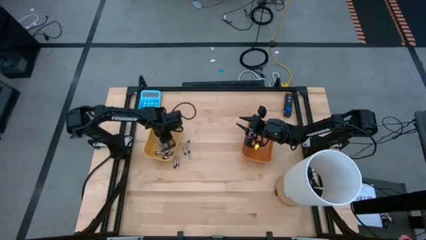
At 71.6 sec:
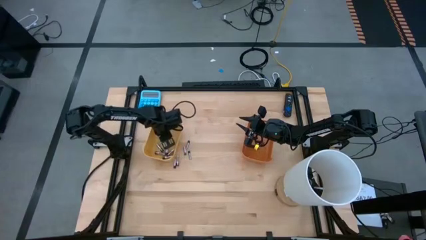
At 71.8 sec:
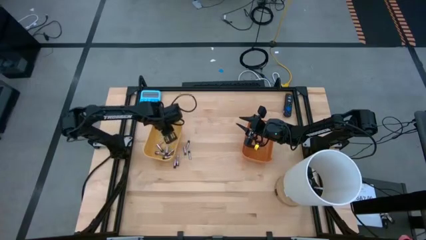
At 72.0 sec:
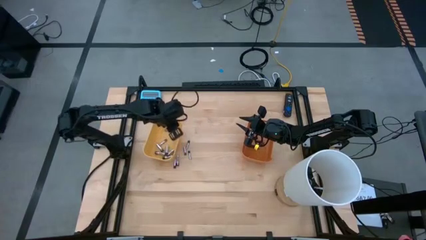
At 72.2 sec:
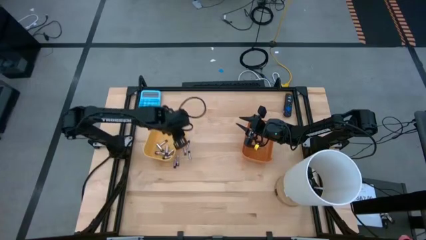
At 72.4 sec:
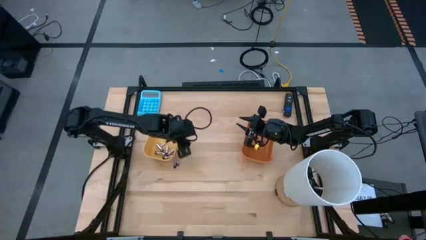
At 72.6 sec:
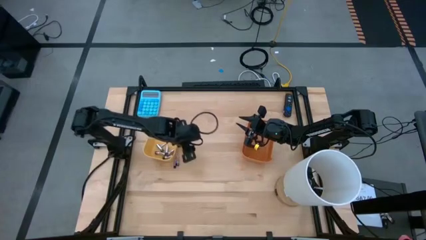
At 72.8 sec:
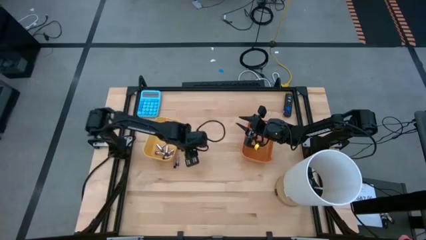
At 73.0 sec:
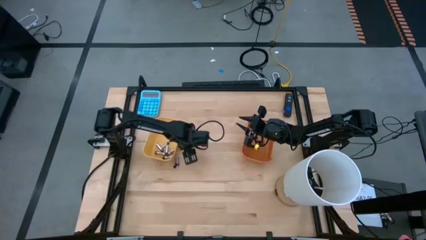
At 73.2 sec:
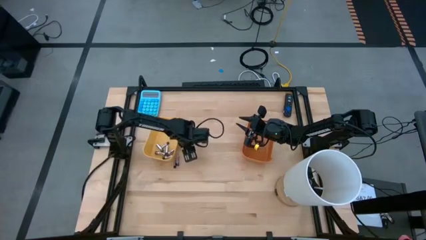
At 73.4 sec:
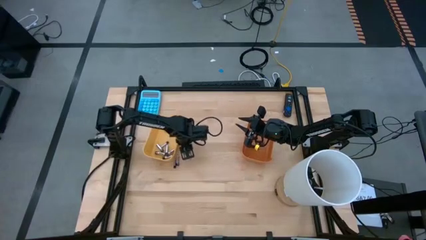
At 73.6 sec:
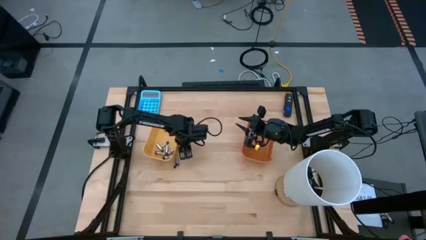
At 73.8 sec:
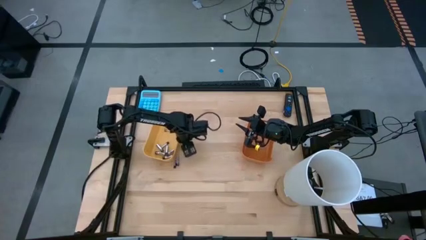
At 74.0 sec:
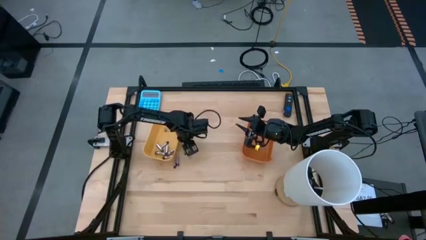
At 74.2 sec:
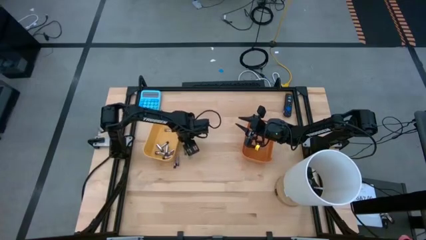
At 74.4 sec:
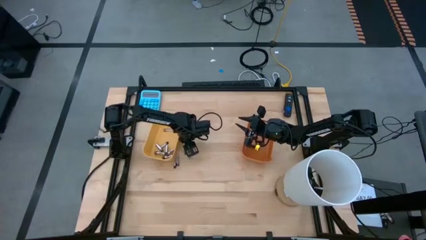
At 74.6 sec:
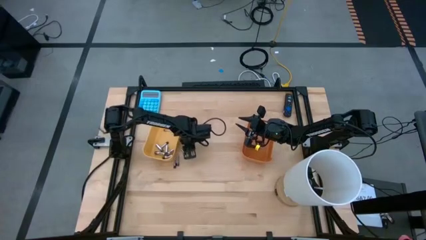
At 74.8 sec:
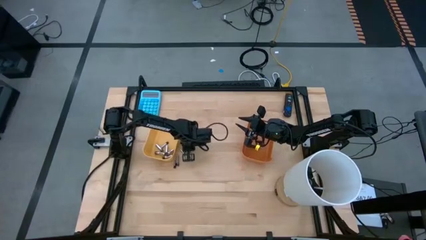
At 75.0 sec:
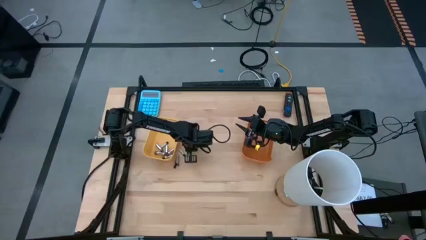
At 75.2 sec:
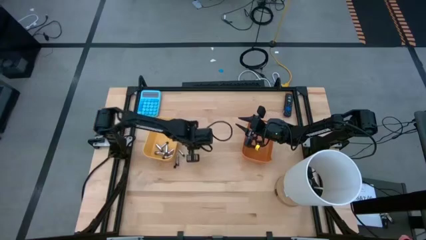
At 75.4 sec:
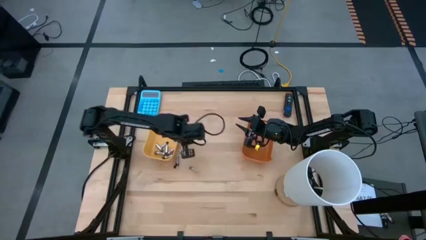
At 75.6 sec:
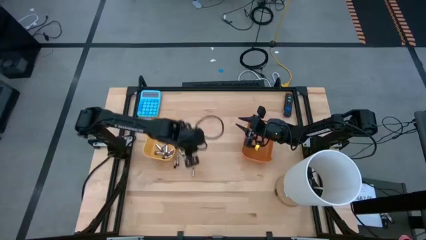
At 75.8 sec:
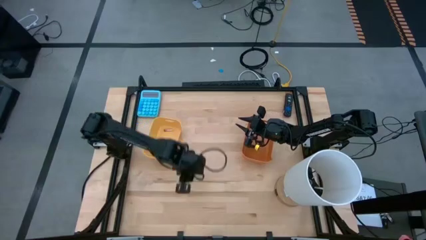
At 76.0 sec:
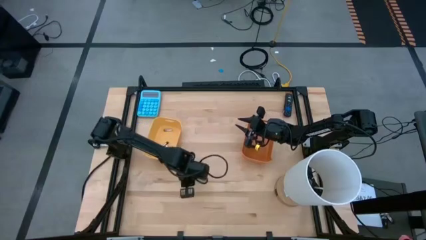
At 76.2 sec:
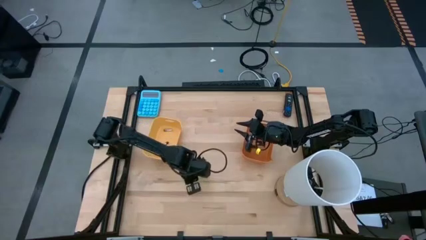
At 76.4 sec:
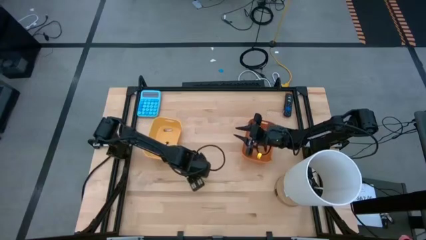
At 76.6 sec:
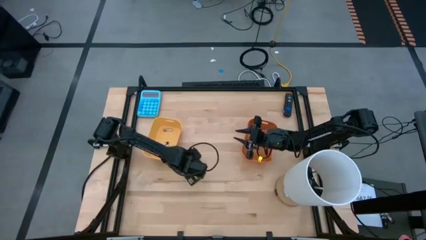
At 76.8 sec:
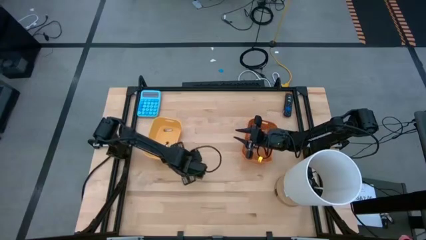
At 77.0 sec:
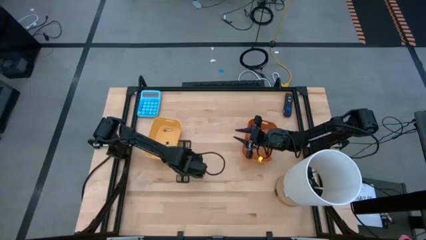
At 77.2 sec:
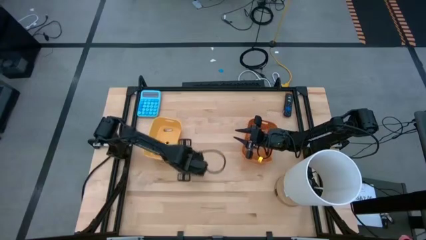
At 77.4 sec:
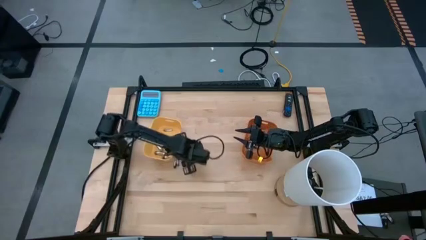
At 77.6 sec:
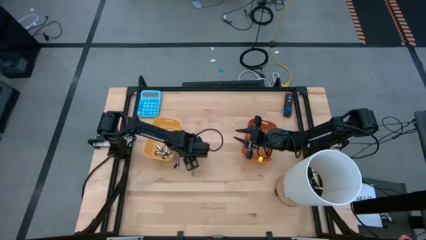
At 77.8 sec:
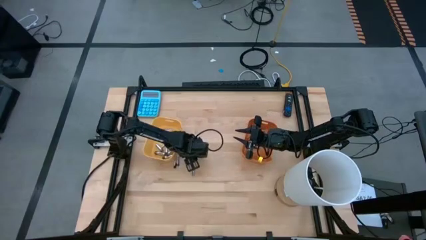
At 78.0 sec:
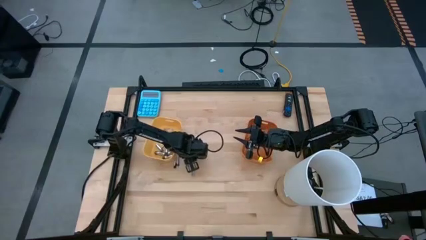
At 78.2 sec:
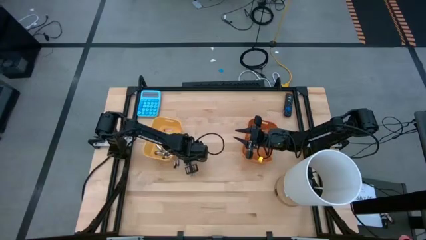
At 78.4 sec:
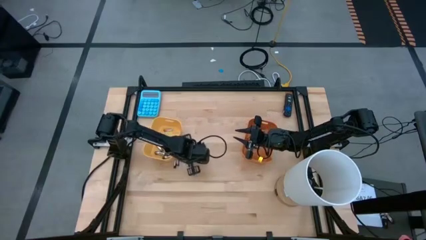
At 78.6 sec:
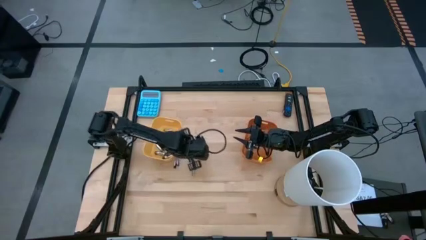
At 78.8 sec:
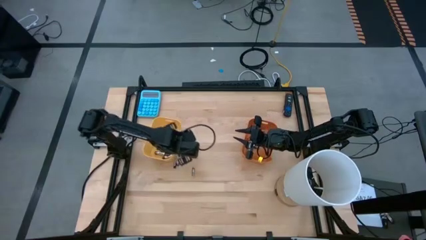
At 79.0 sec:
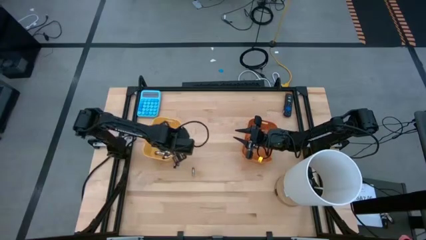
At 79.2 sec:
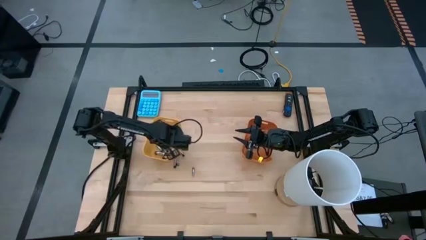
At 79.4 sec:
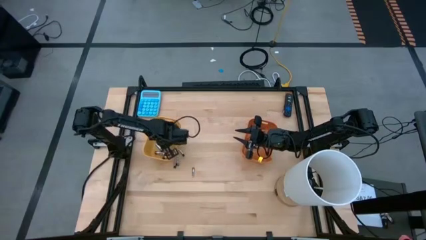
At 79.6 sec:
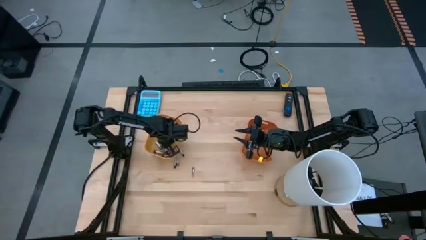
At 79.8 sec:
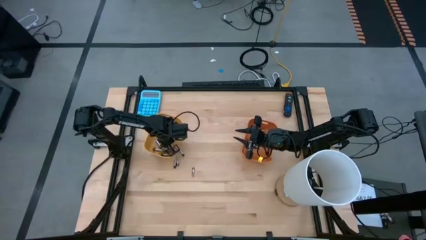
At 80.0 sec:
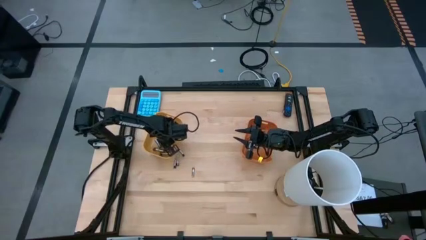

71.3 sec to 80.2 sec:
Task: Sort batteries
Put the silver battery into the yellow bin

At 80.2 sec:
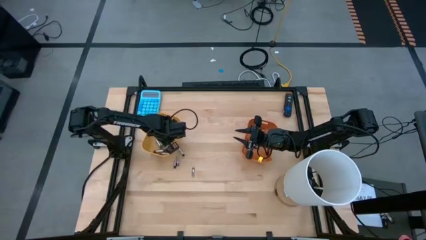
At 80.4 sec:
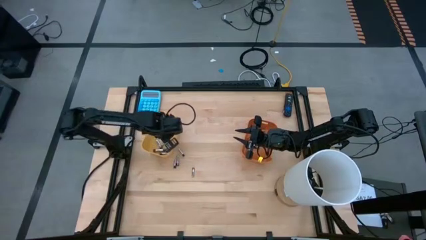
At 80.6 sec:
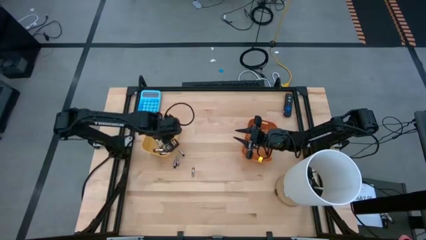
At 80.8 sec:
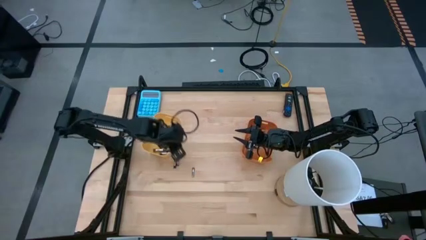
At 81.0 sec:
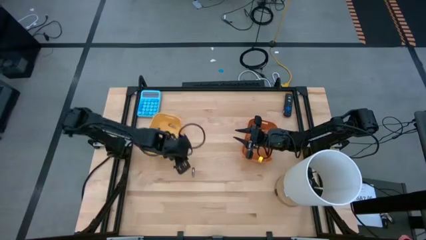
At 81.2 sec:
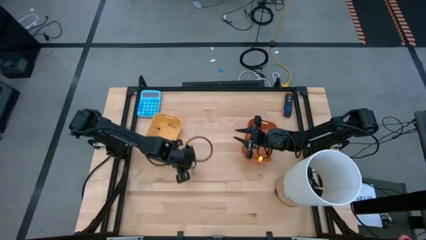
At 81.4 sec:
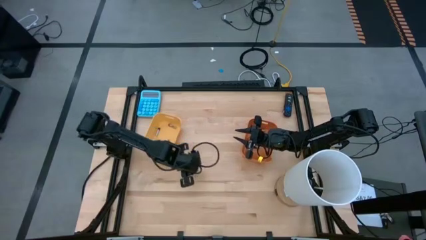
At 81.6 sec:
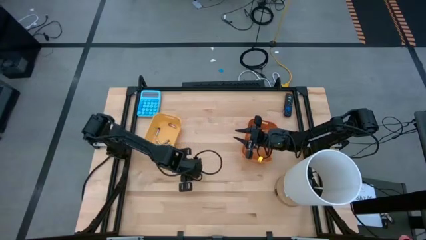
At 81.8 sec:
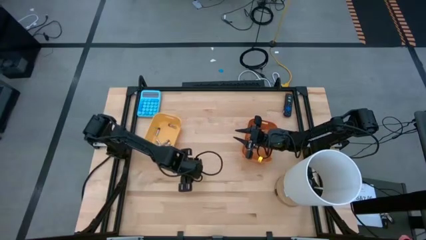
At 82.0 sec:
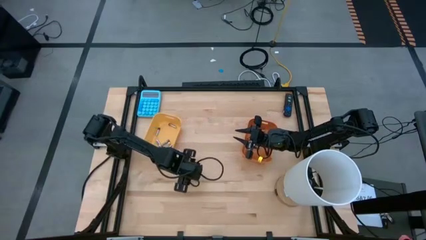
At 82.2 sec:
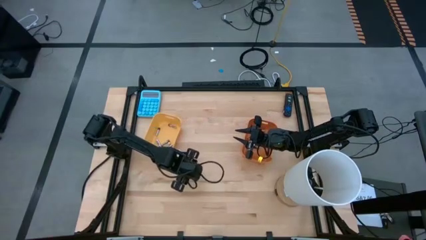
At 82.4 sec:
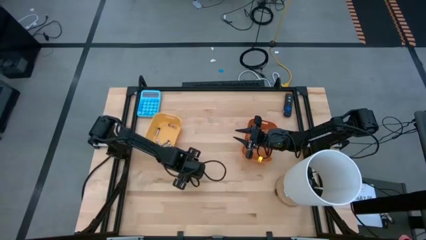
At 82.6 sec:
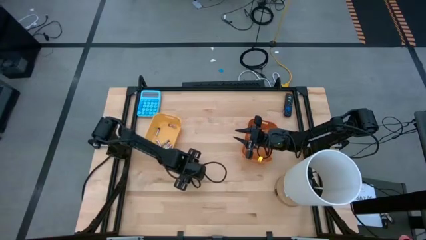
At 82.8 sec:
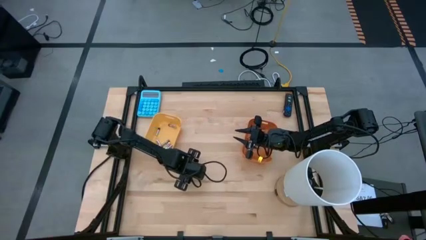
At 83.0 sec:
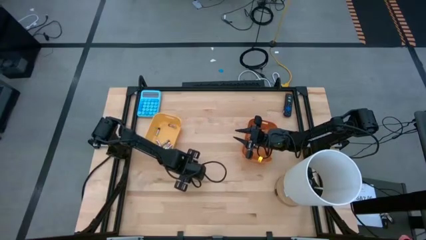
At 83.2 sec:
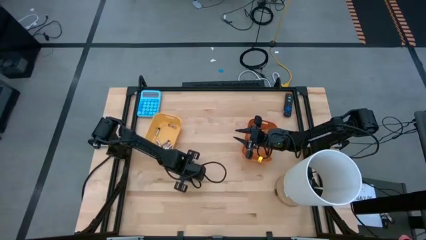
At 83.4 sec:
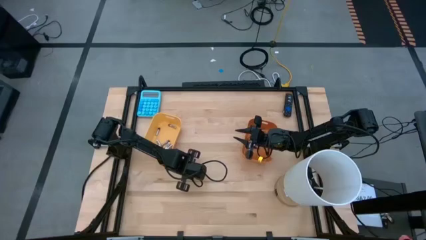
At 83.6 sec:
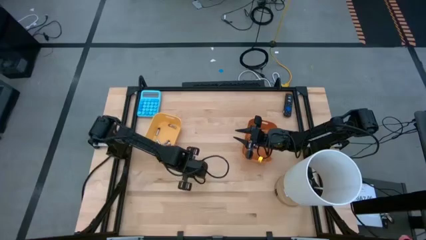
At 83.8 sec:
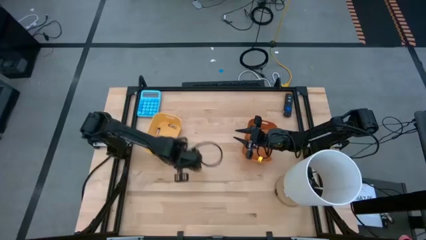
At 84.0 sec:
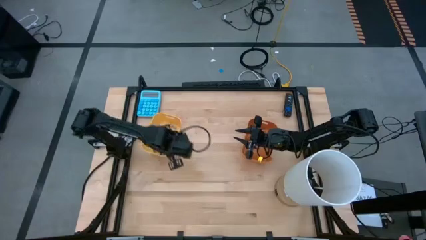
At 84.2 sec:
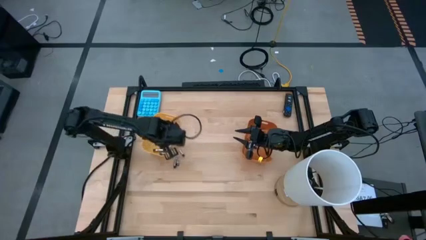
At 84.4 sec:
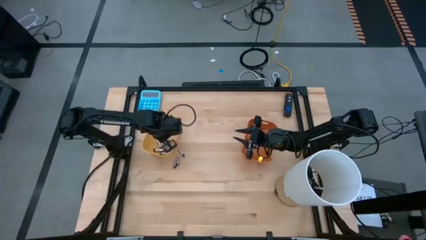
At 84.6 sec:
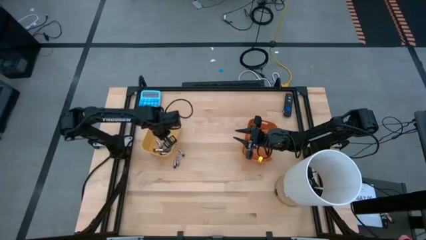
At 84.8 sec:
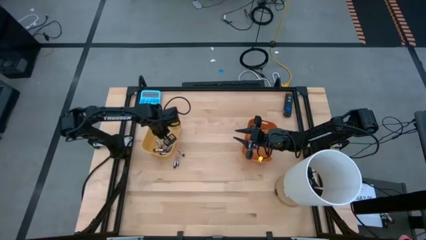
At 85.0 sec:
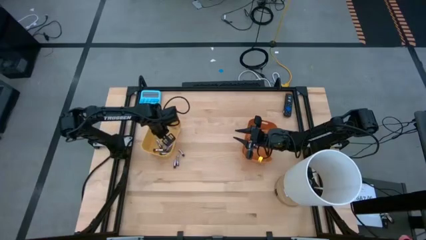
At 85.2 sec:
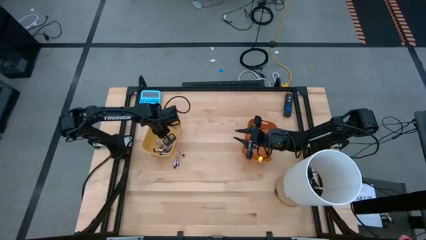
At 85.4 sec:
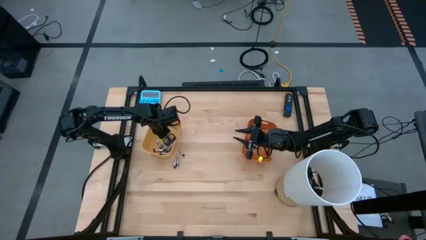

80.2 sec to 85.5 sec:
Put the silver battery into the yellow bin

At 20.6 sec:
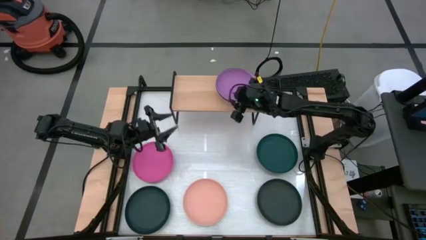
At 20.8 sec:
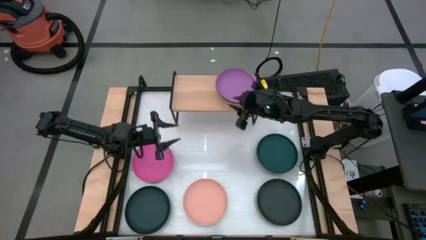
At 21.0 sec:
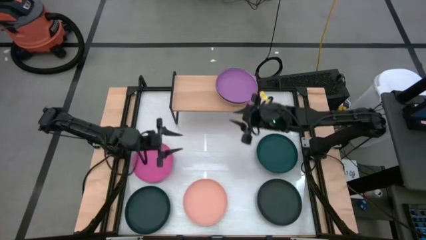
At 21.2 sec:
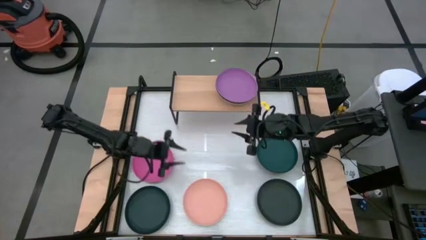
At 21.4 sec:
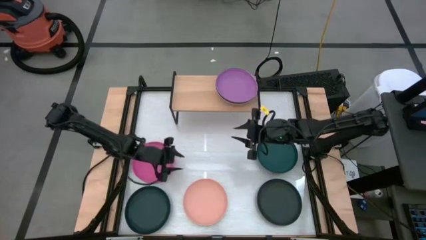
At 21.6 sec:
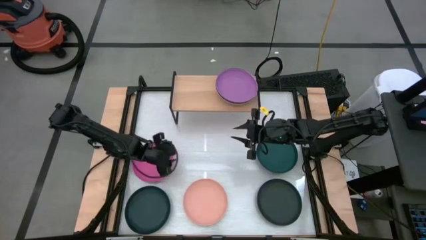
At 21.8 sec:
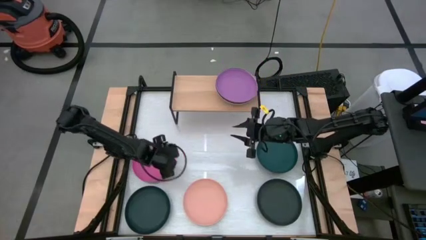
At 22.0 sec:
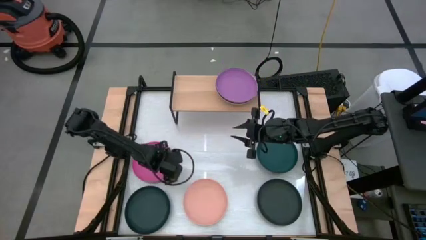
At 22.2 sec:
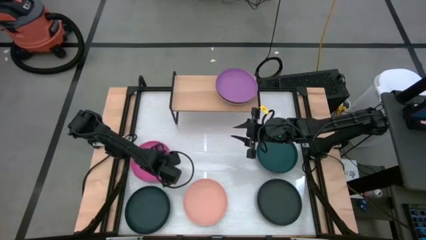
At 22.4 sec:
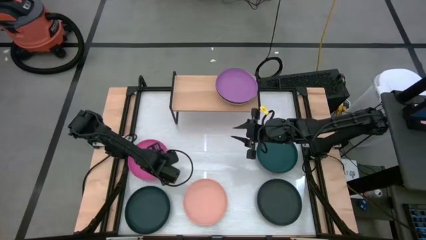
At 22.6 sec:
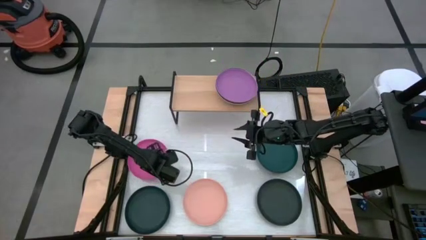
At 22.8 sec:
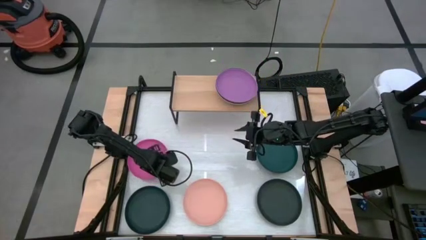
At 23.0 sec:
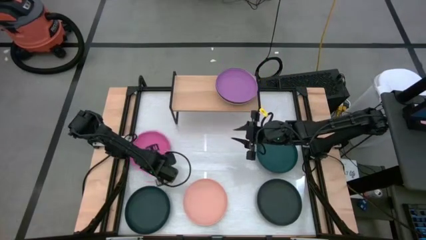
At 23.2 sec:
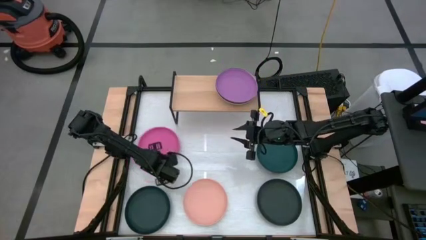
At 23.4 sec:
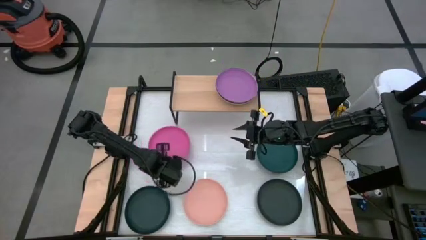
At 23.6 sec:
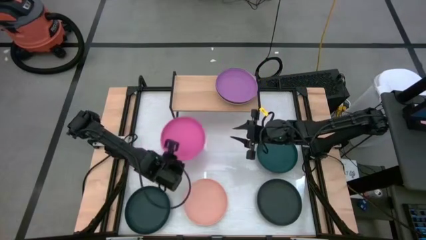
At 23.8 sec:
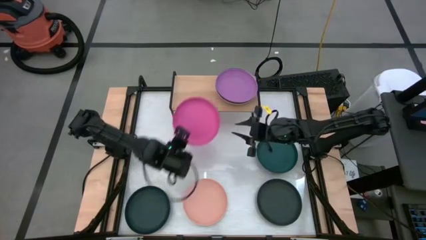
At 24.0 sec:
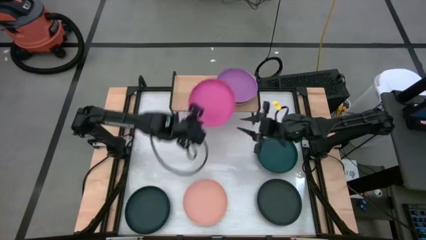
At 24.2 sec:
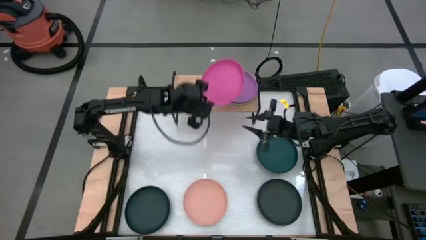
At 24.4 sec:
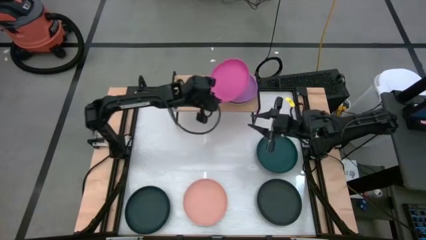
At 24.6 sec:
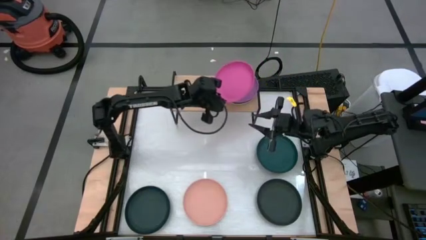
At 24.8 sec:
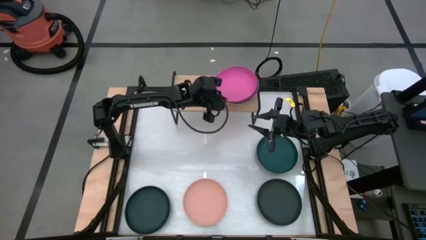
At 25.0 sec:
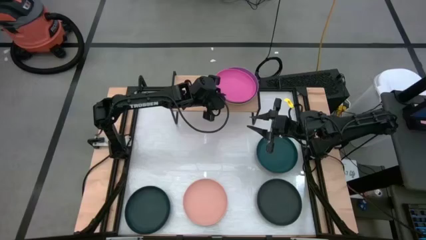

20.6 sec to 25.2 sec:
Task: Place and stack plates onto a shelf
Stack the pink plate on top of the violet plate on the shelf
